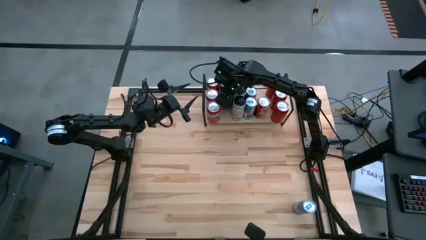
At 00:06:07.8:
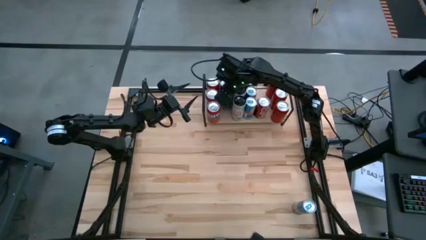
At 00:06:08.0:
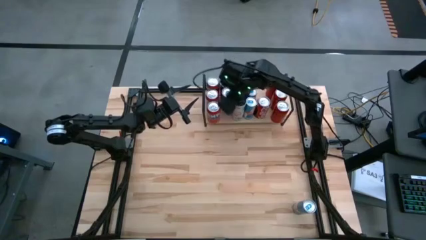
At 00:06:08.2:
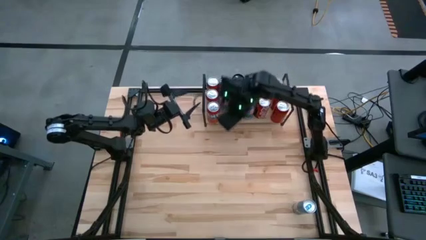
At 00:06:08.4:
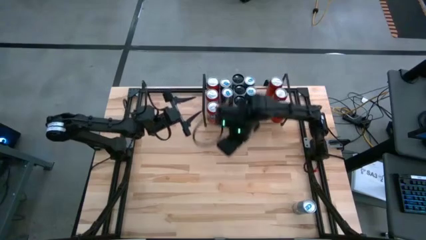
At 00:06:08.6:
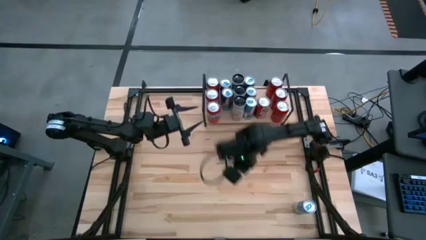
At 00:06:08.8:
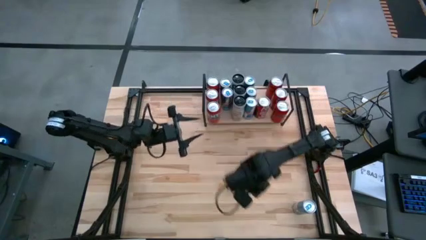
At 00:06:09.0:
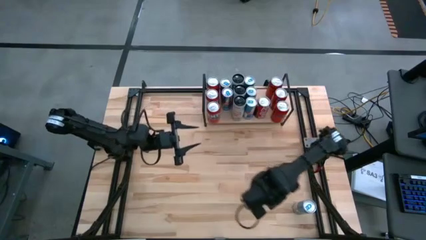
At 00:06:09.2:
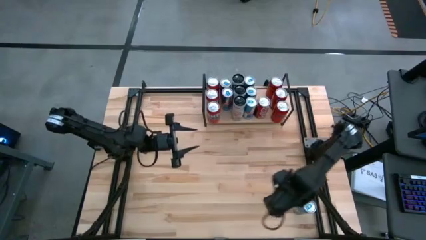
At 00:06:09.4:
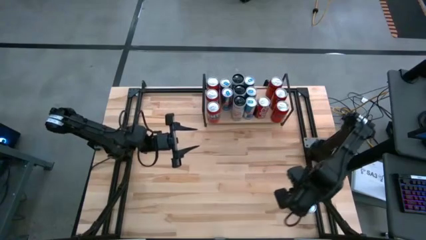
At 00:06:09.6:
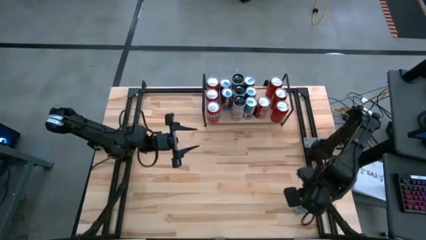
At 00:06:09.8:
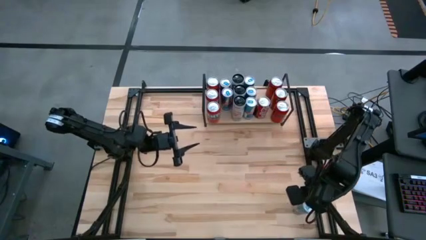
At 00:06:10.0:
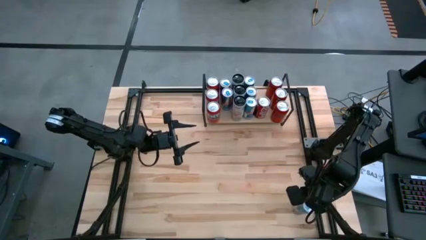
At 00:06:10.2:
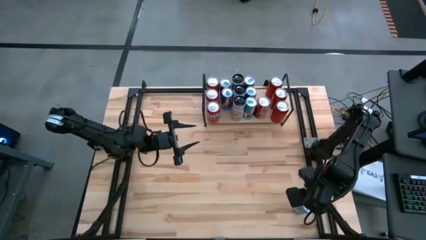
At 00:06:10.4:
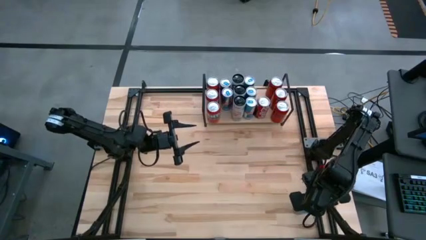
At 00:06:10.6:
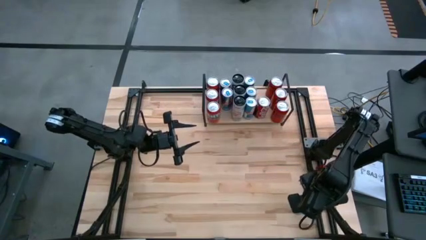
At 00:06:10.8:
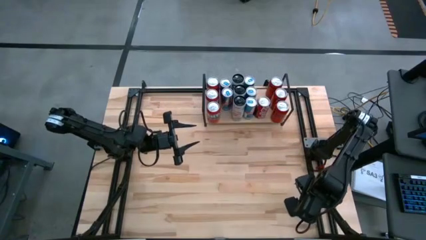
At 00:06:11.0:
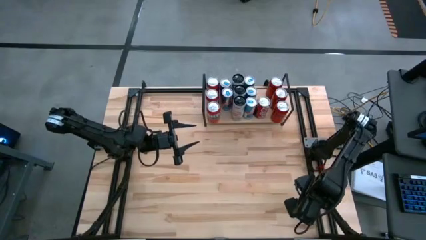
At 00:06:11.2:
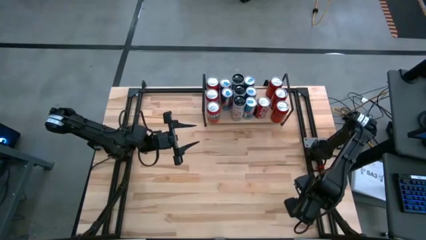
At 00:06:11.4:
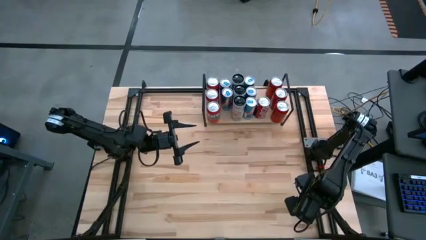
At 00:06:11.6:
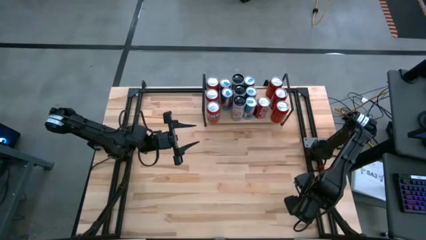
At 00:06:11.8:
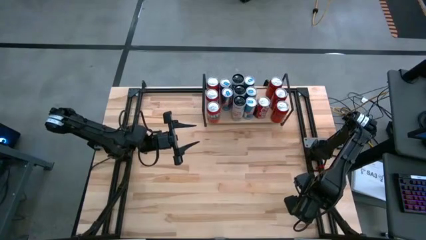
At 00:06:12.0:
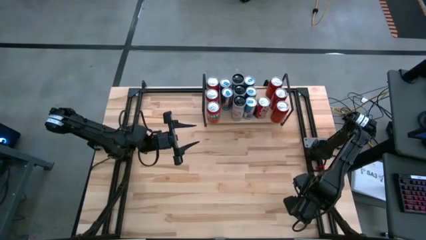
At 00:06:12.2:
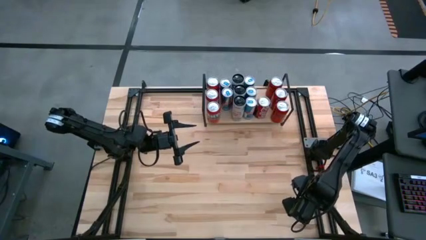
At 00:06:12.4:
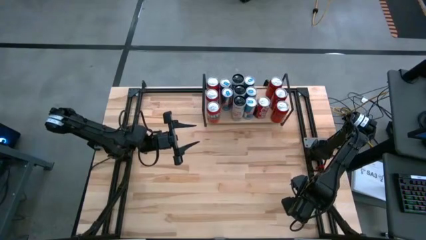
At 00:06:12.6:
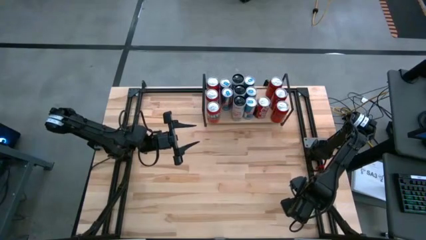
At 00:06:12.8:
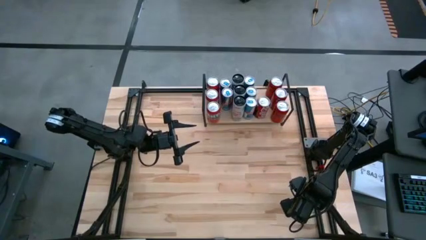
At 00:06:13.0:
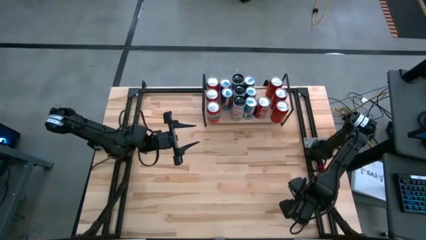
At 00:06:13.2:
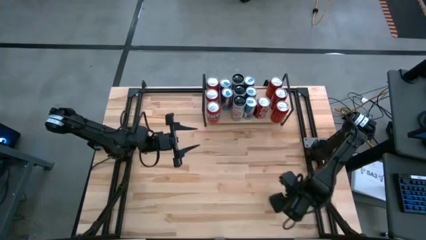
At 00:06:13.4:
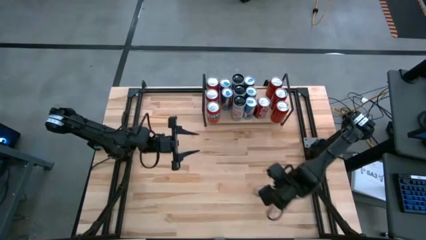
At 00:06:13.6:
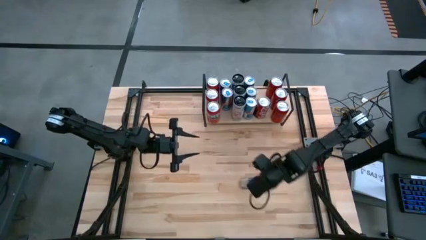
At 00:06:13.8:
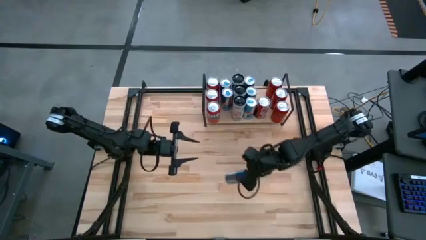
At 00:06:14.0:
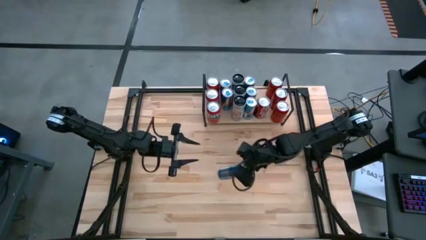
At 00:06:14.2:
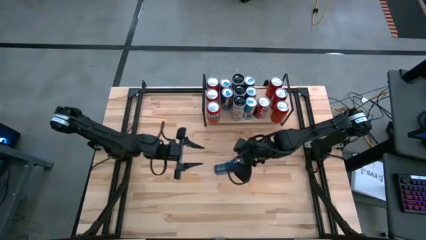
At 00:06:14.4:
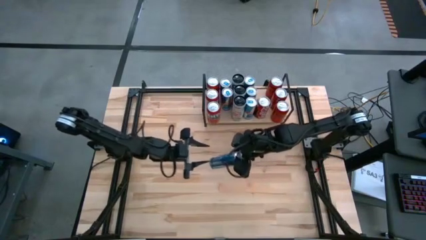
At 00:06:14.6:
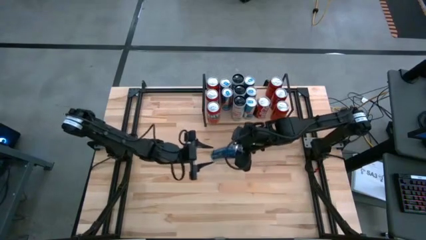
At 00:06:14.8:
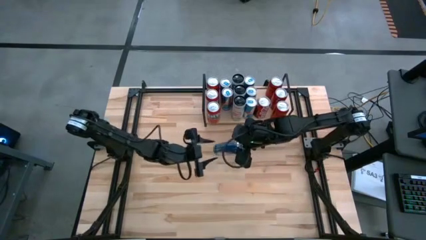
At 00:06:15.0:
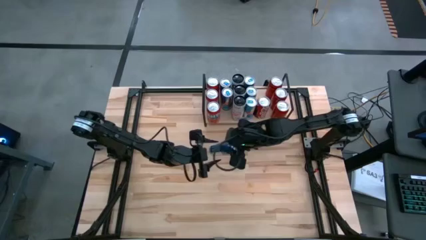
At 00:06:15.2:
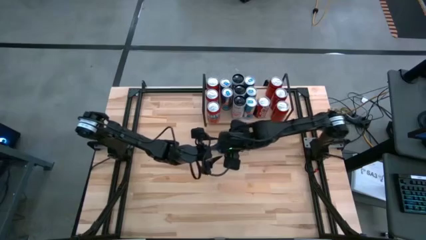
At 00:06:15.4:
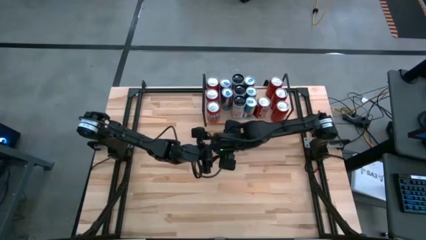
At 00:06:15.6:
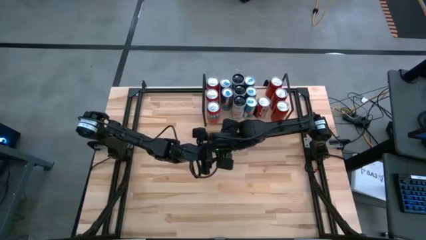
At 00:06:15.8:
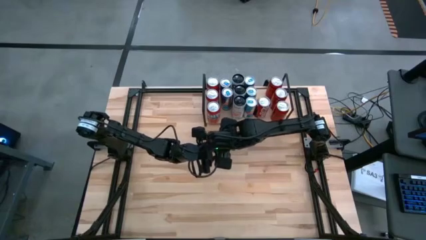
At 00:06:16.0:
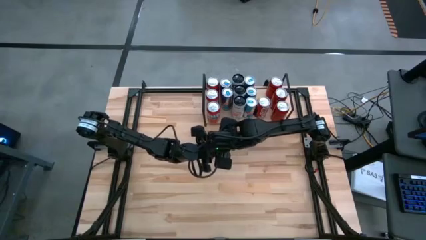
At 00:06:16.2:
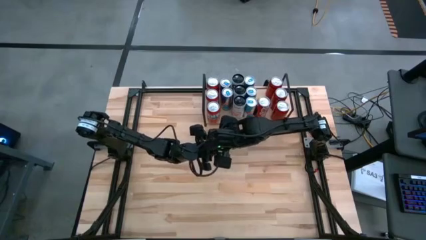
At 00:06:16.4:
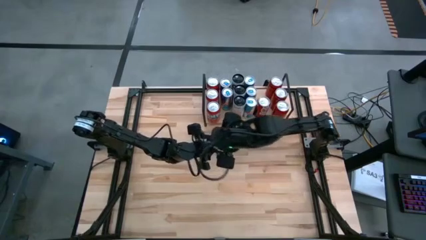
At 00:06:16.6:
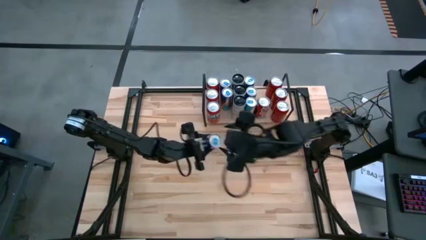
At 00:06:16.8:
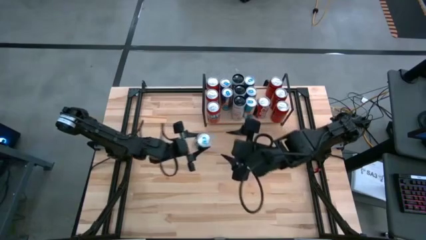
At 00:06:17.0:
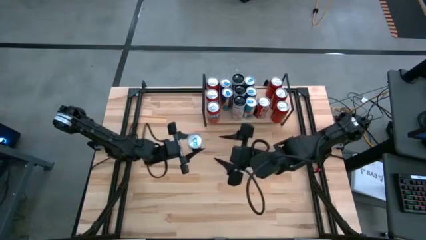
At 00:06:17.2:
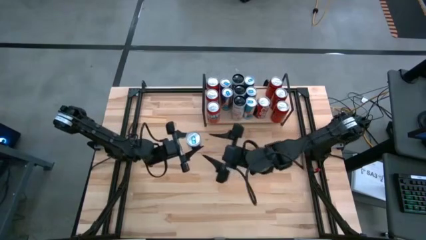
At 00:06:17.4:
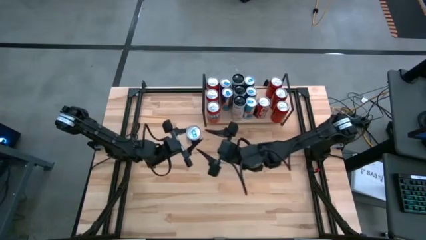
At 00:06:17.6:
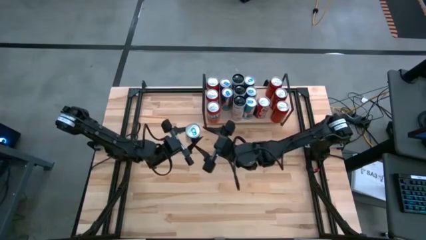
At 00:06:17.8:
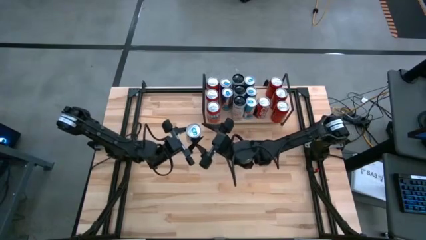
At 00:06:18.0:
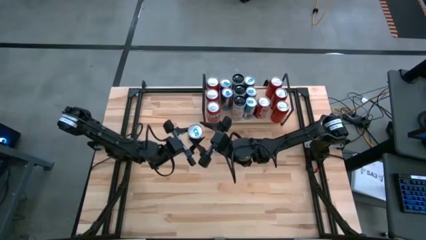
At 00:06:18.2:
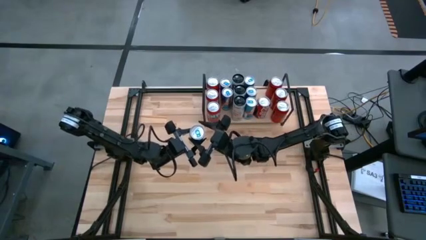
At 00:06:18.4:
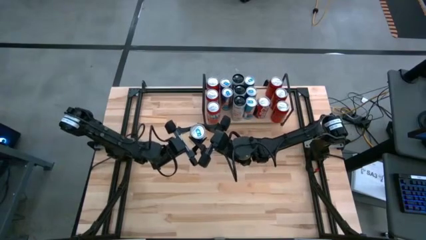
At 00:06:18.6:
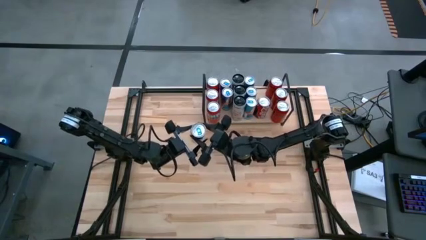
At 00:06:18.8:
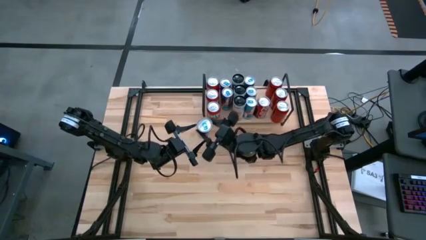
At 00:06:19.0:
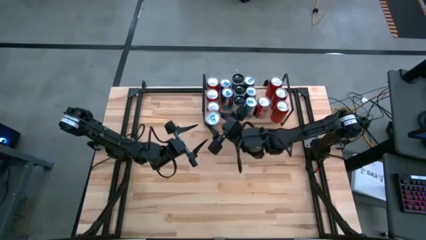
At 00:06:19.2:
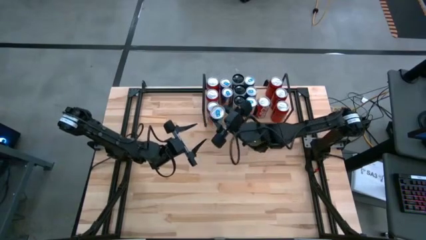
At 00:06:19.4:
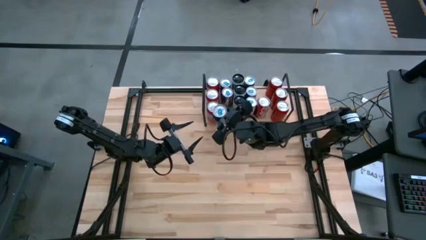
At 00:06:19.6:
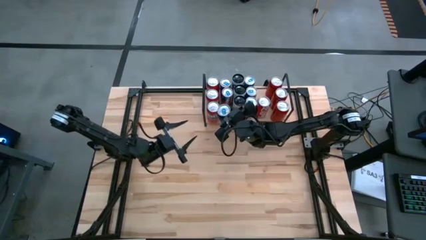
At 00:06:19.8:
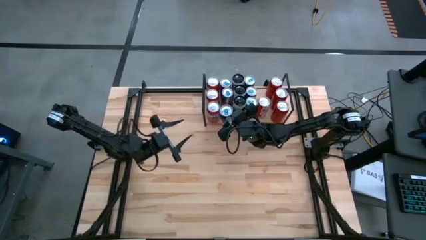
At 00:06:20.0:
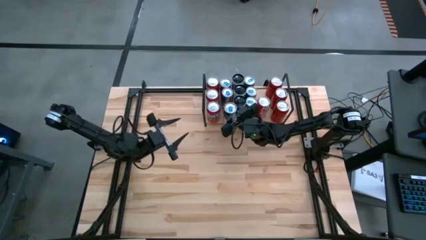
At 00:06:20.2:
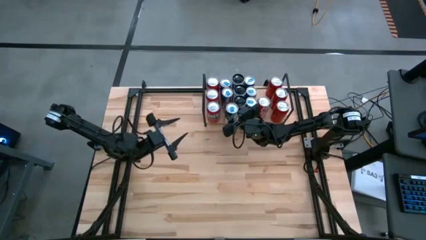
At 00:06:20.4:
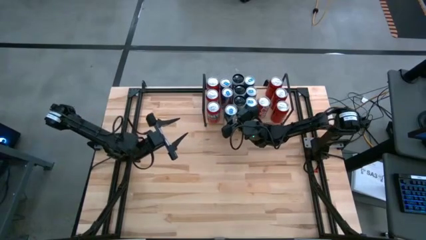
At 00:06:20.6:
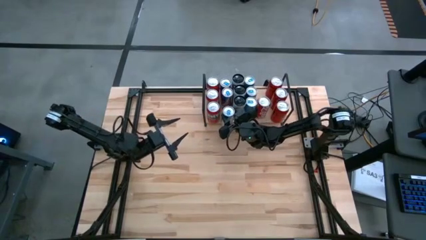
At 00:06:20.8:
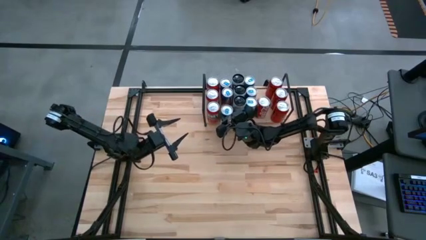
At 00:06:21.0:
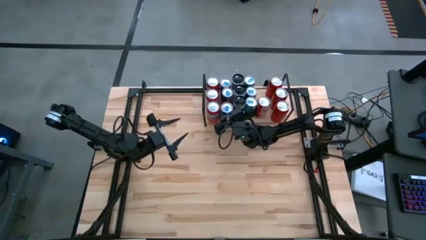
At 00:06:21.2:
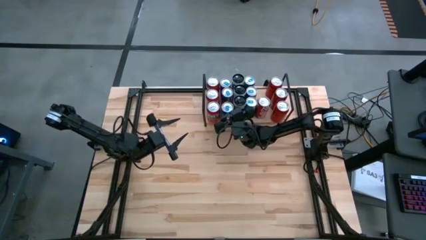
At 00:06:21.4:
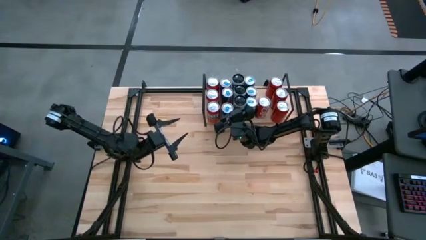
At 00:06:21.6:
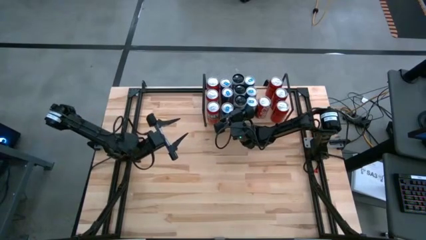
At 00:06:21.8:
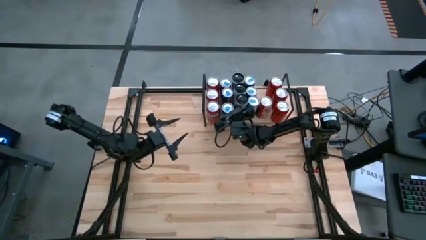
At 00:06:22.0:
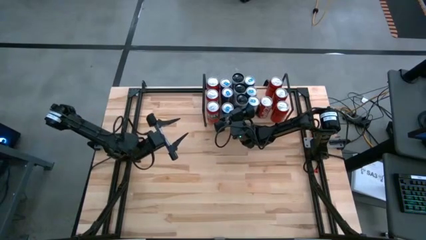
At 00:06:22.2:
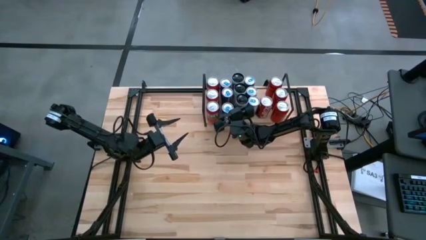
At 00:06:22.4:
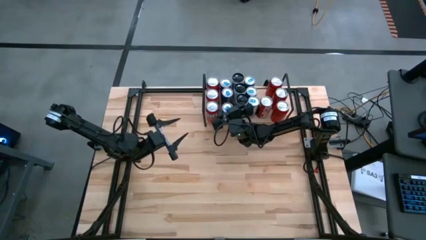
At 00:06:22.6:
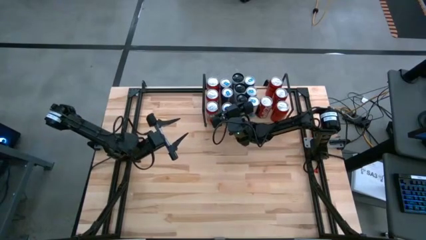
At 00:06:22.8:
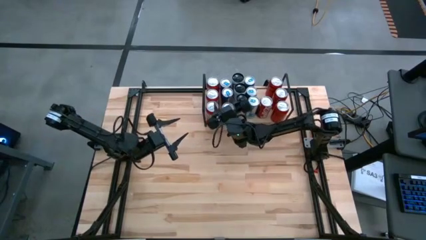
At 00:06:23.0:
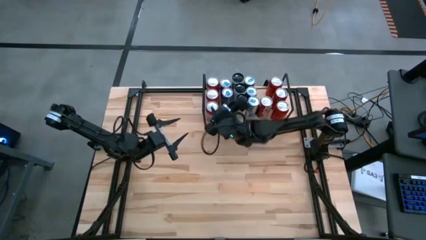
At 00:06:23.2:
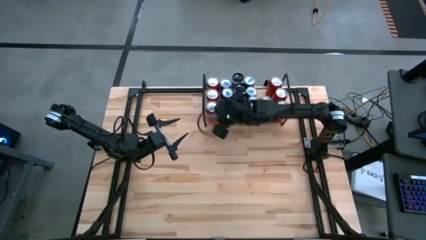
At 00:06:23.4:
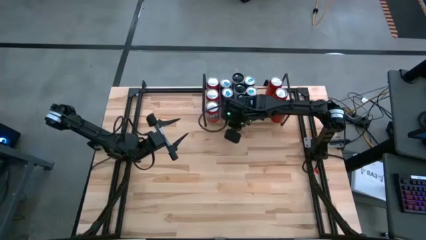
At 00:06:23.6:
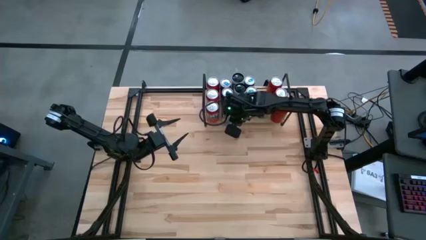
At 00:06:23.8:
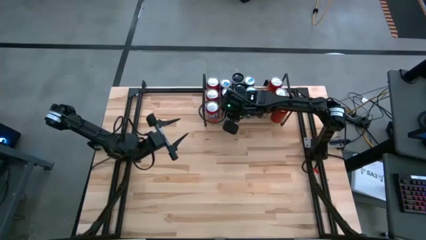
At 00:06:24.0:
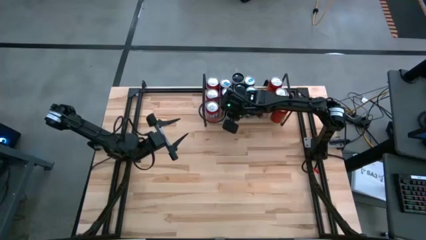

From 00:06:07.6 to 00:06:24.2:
Task: Place canned beverage on shelf
Put the blue soda can on the shelf
